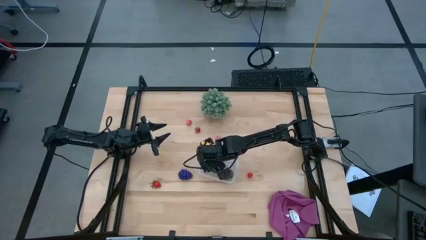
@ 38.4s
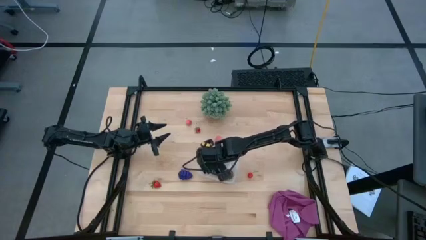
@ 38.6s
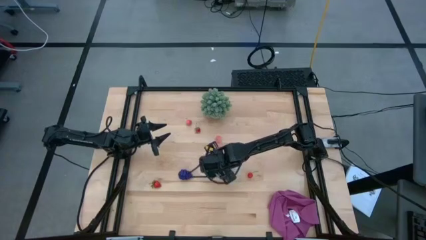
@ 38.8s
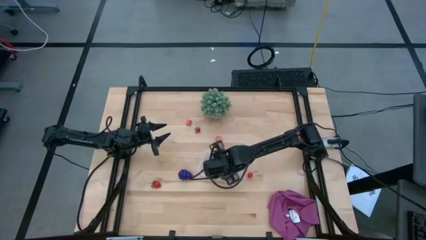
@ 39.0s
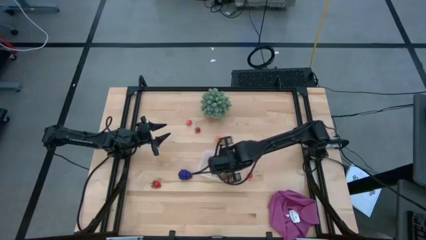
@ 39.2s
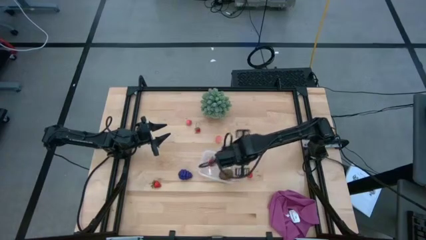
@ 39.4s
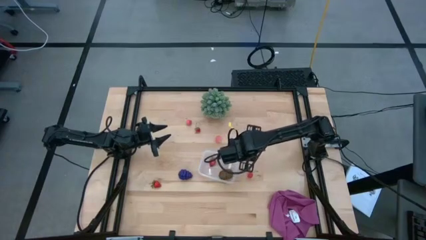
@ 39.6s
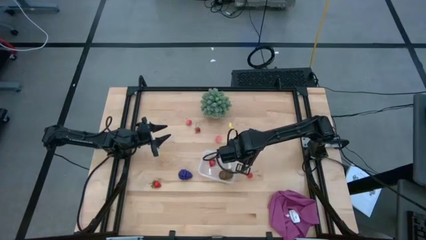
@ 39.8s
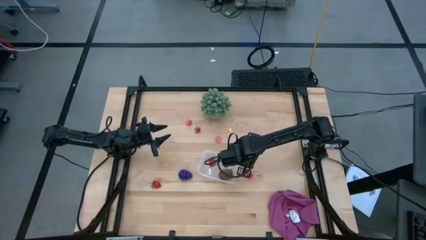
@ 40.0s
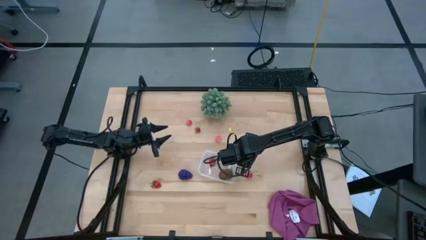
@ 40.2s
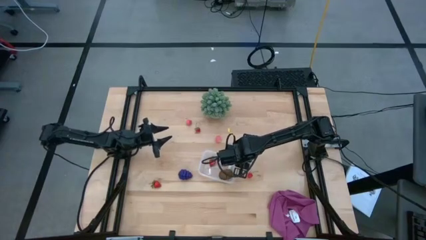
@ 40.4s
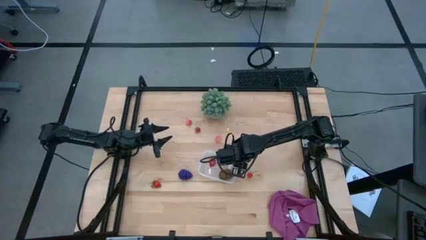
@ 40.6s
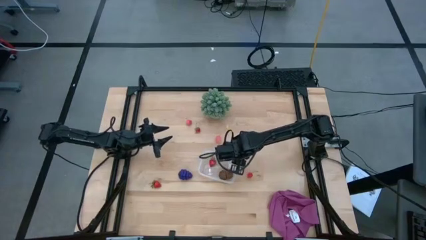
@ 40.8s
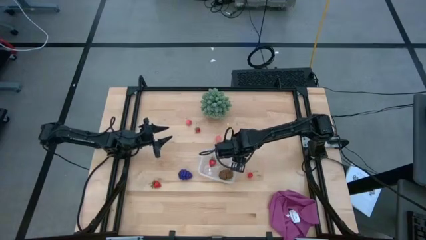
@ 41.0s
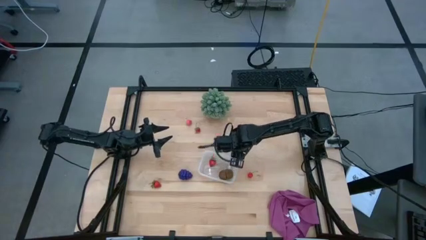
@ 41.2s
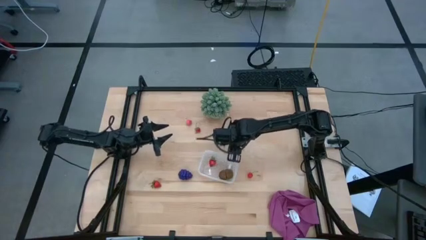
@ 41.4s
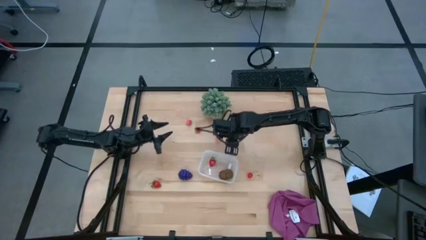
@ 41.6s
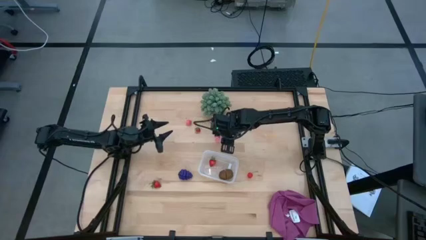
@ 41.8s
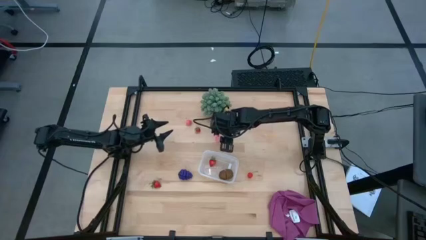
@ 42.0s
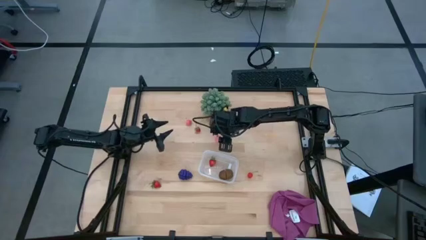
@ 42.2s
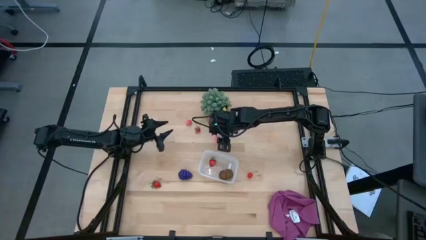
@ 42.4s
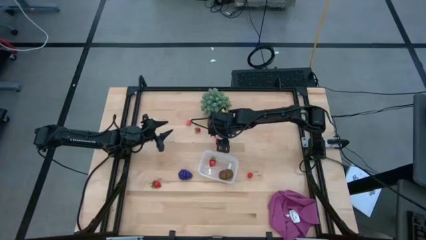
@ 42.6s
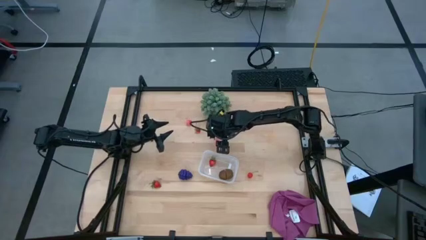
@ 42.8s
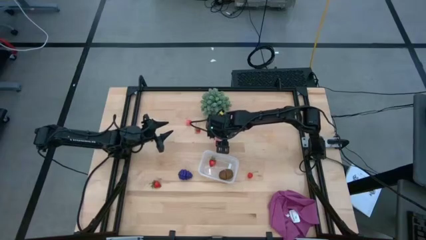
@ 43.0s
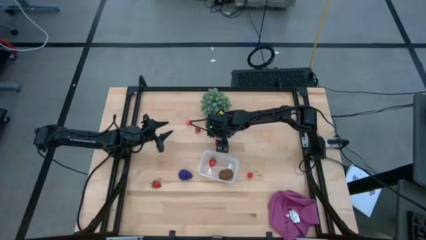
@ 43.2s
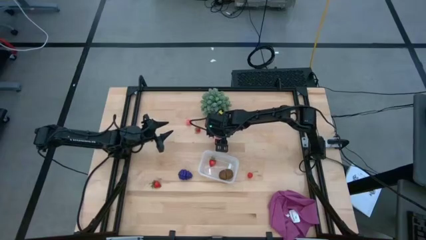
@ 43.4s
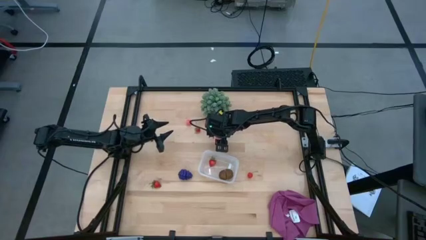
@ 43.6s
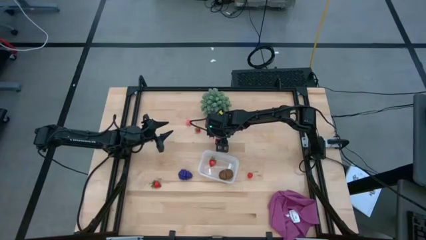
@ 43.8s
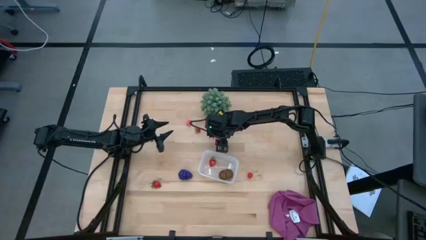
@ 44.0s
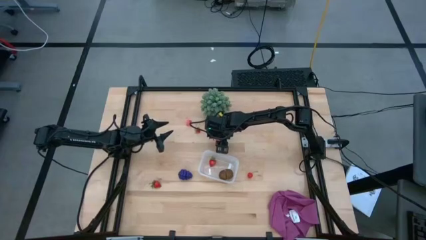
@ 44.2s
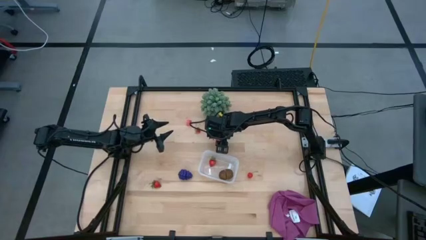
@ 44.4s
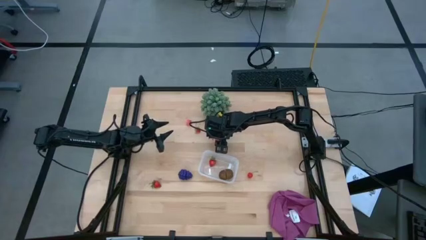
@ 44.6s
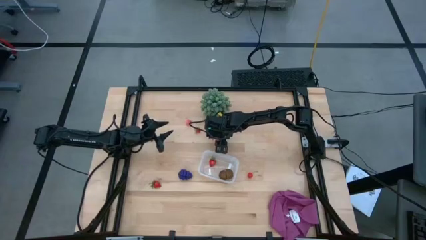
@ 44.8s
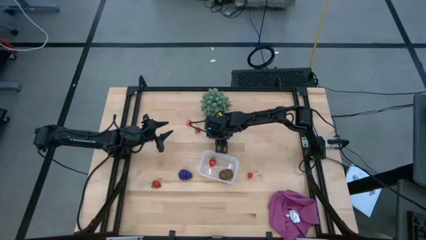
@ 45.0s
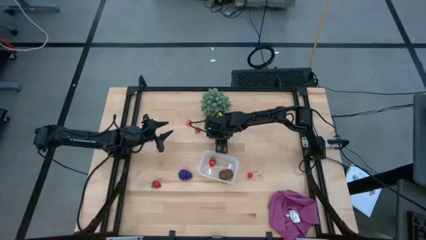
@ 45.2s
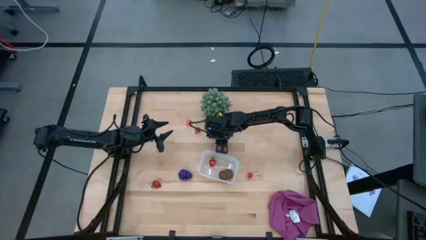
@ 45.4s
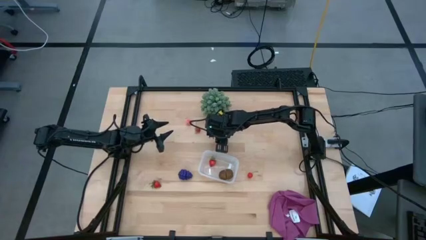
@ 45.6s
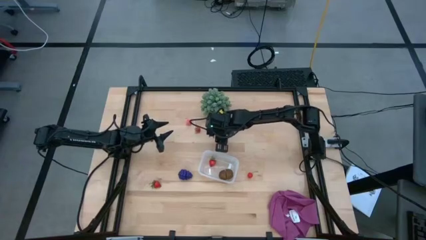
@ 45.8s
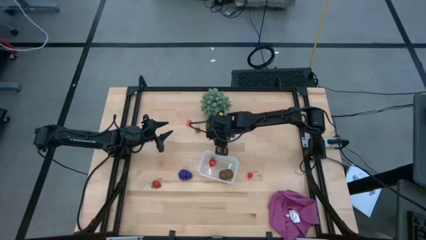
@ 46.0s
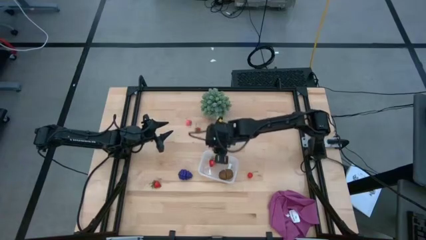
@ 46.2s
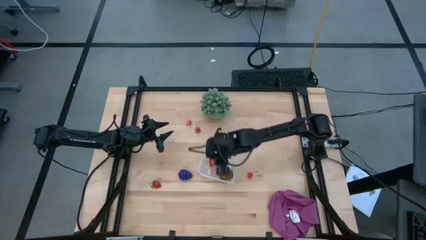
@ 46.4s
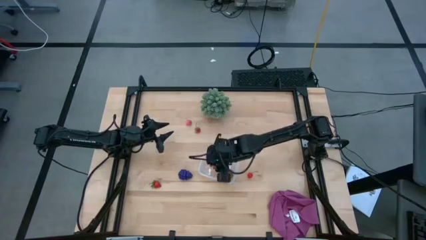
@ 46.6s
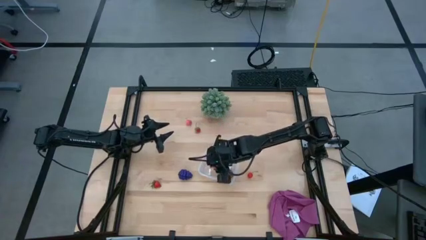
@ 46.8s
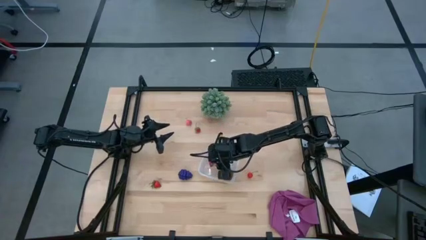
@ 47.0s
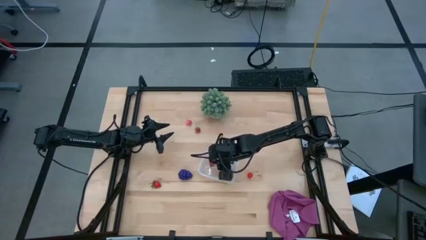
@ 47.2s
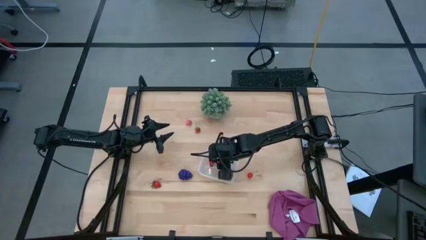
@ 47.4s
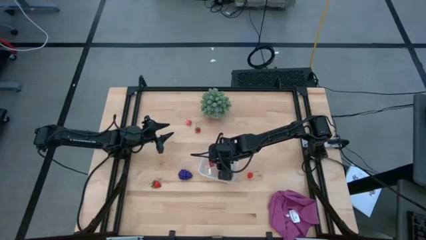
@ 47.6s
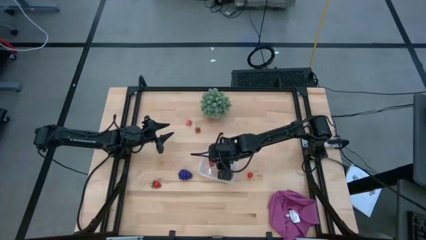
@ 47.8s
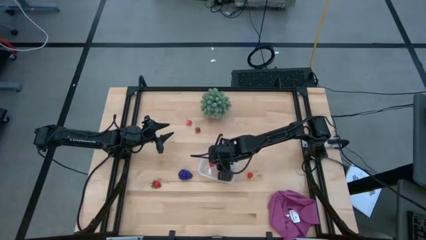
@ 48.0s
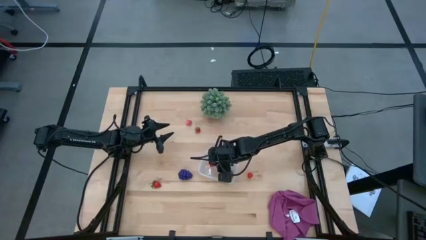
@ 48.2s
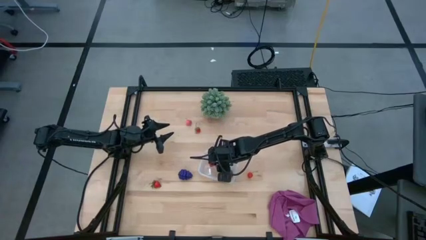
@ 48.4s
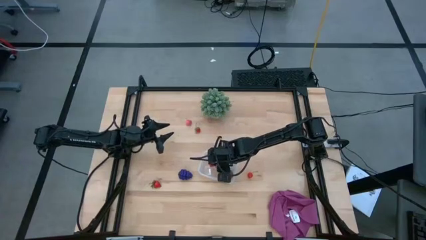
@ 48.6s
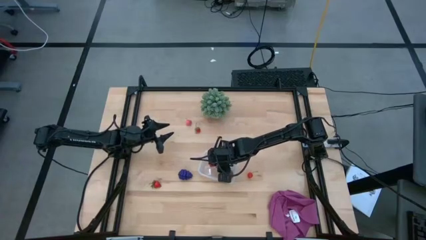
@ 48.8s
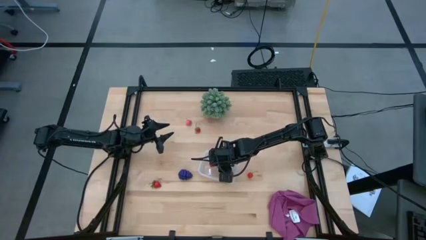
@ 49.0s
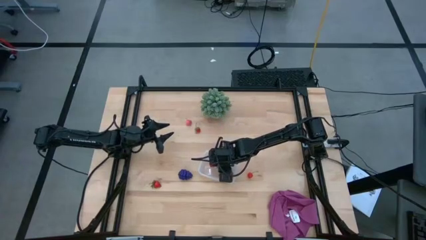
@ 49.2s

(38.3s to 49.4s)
Task: Pick and placing Produce into tupperware
Put the bottom pink peach into the bin

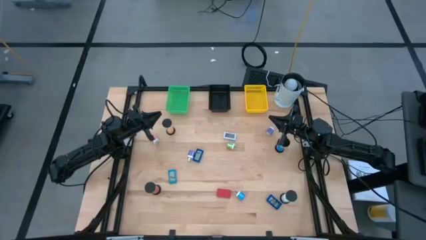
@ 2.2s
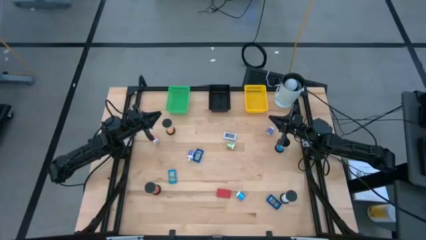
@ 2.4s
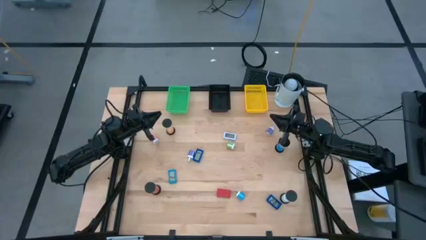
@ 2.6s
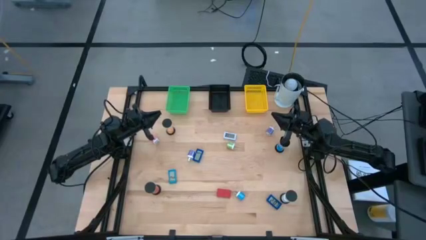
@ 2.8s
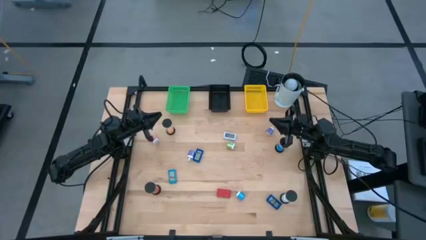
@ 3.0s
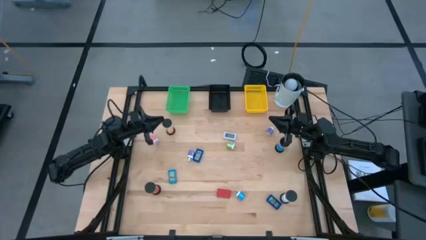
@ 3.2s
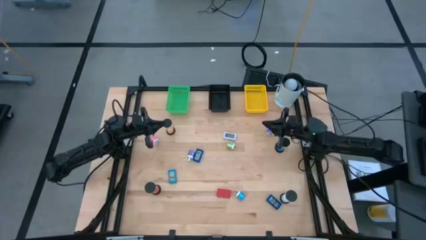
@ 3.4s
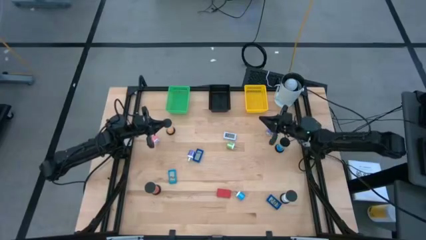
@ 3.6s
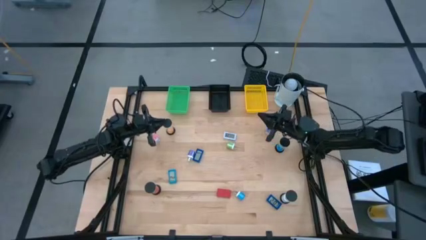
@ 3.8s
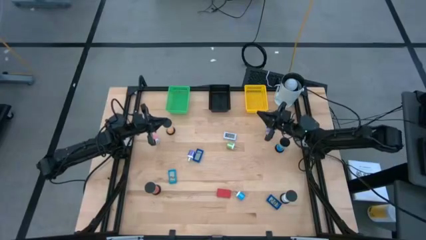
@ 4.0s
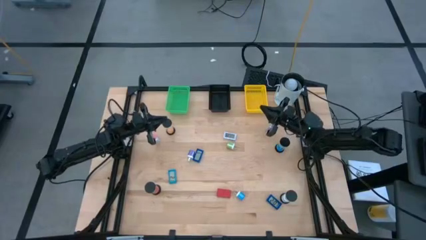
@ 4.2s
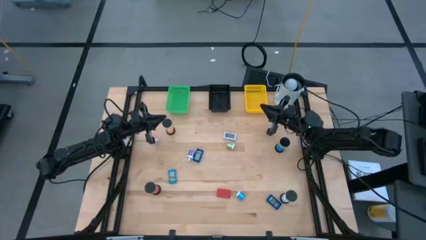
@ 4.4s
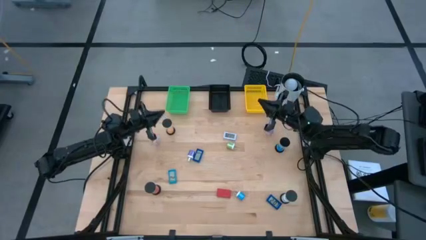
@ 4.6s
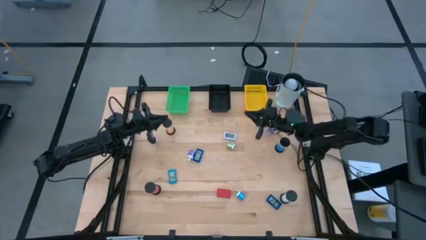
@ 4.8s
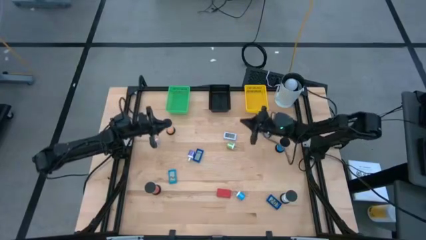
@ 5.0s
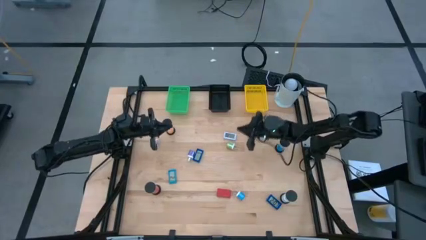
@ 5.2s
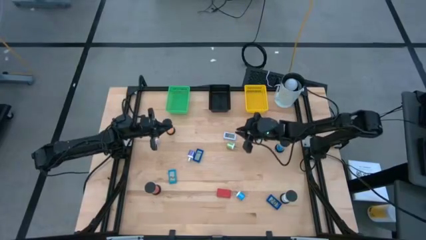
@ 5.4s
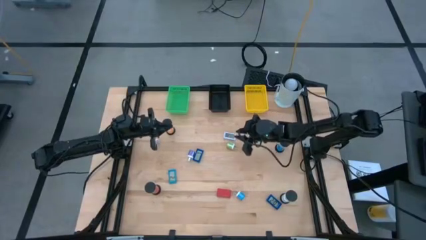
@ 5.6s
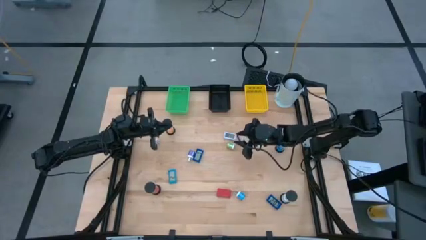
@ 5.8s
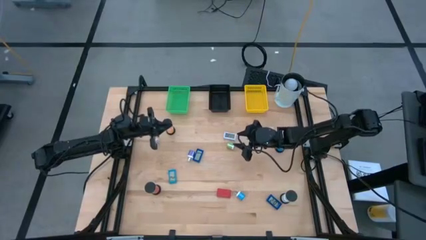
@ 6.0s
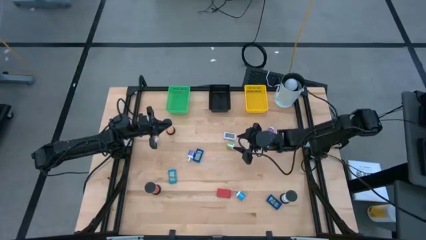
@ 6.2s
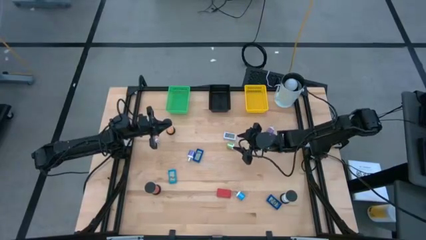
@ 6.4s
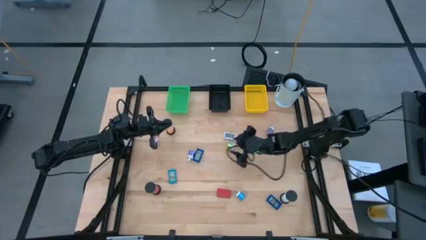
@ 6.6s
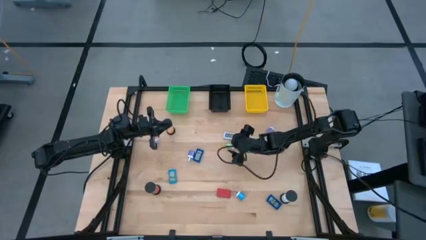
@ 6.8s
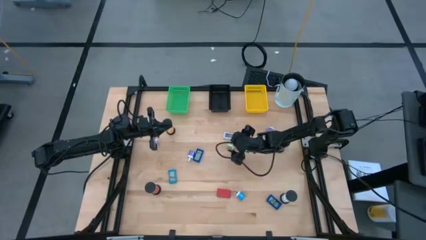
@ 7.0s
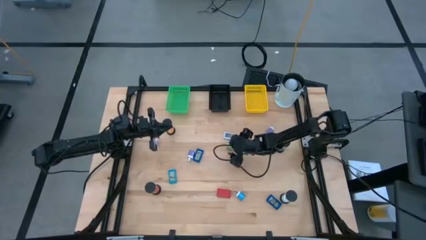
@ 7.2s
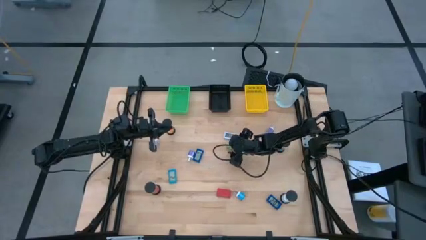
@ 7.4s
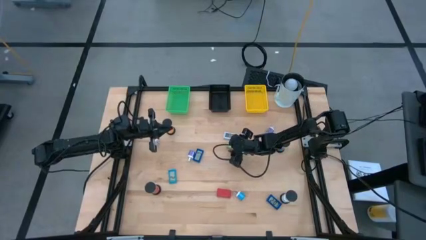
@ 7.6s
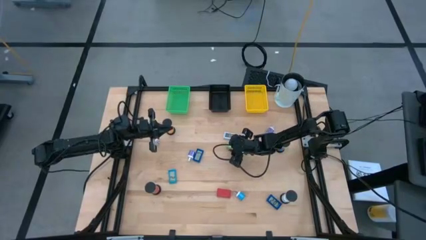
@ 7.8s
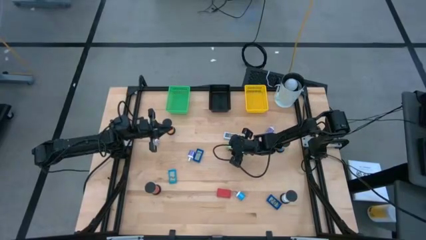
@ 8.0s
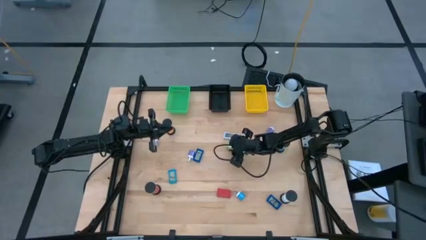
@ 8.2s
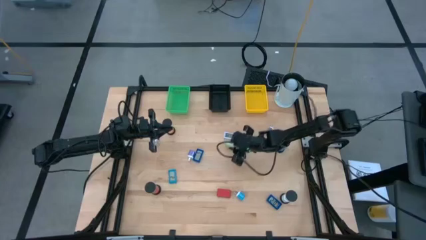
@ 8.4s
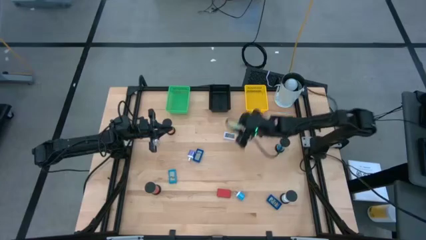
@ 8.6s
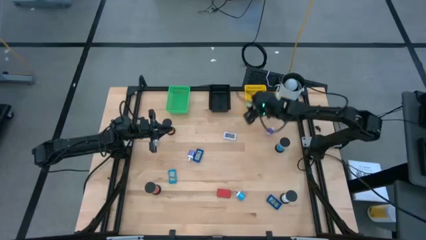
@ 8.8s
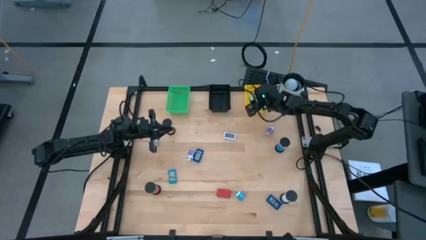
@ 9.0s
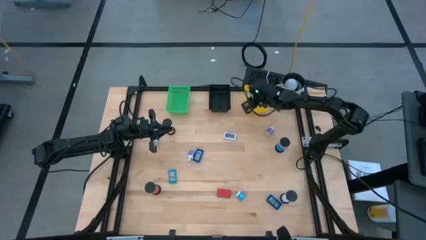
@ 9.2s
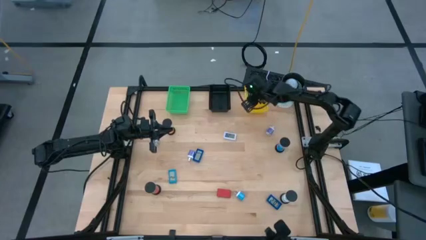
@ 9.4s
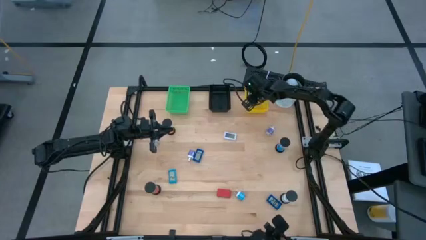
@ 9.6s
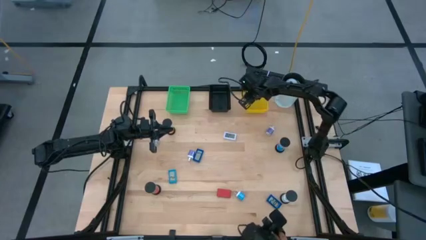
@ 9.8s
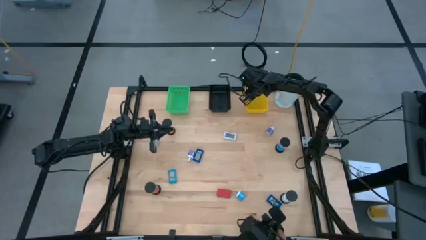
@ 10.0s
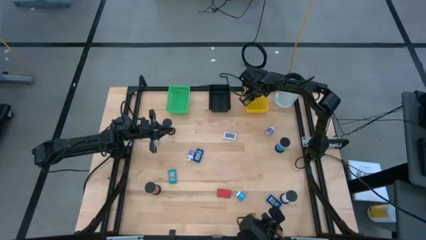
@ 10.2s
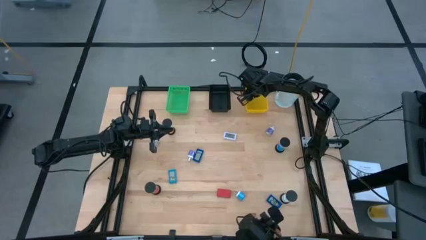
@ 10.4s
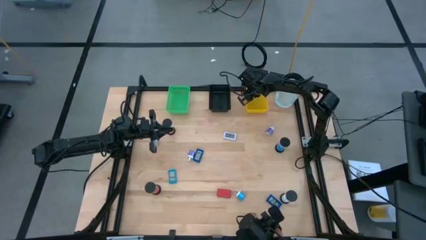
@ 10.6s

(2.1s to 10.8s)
Task: Pick & Place Office items
Put the green charger adapter into the yellow bin
